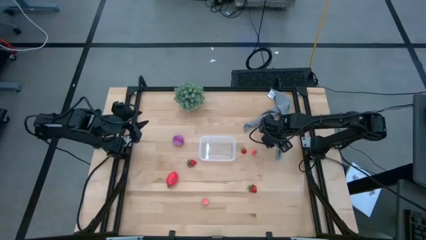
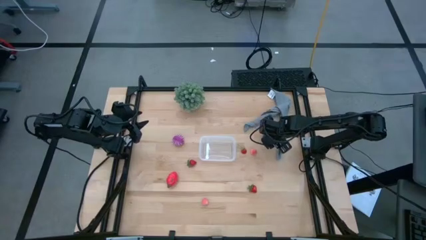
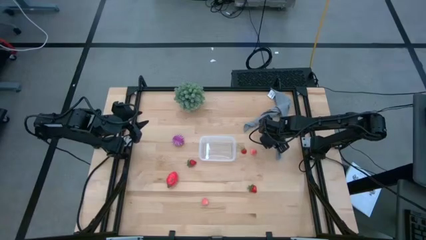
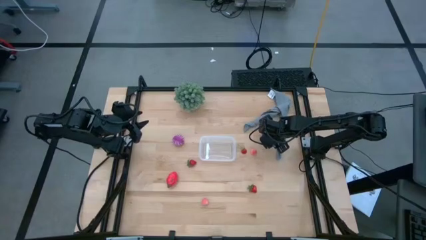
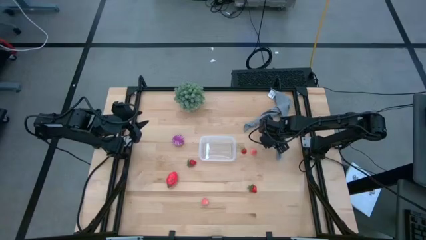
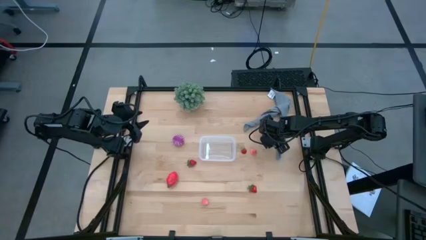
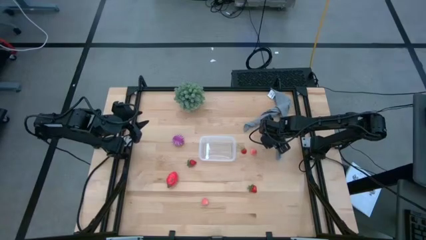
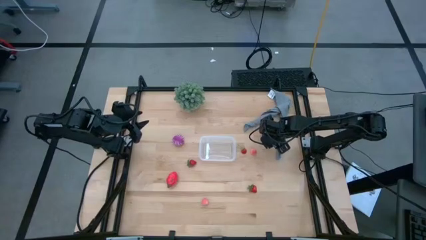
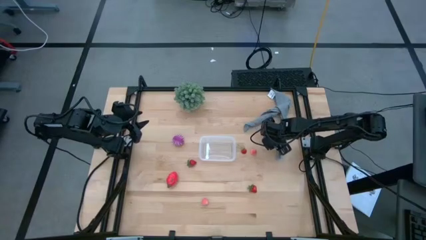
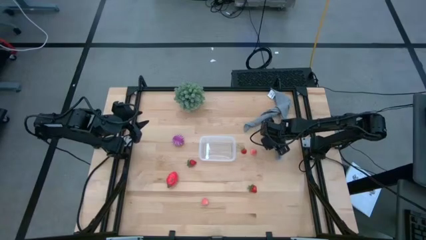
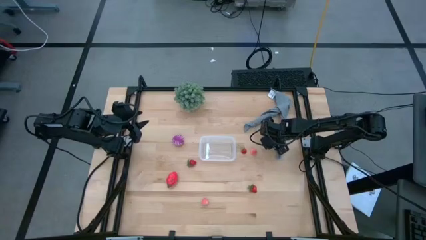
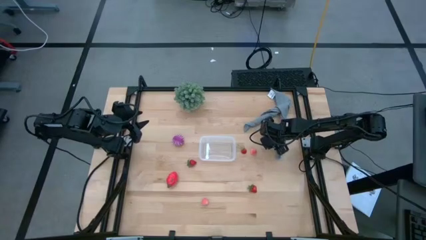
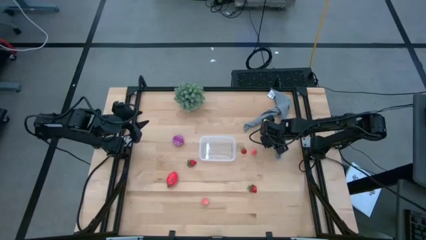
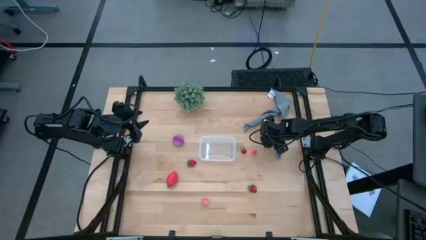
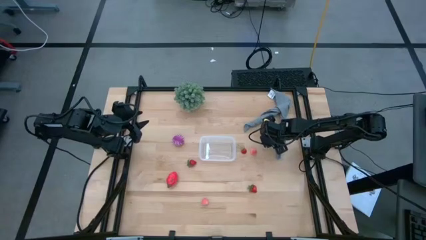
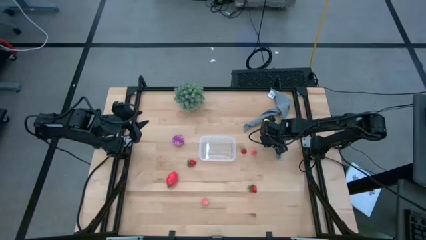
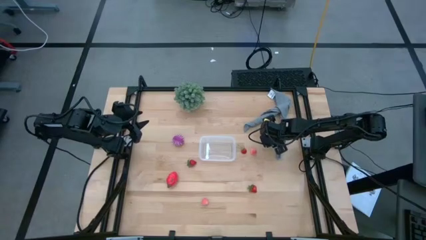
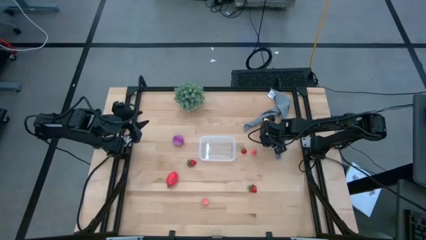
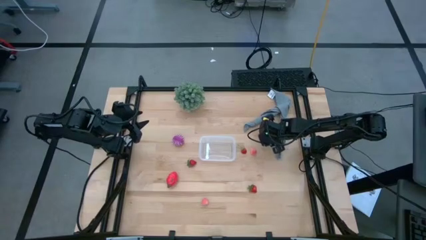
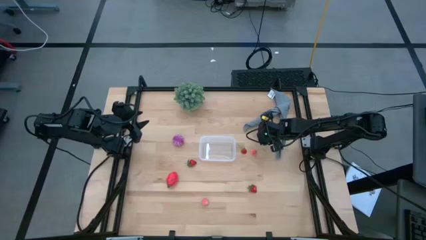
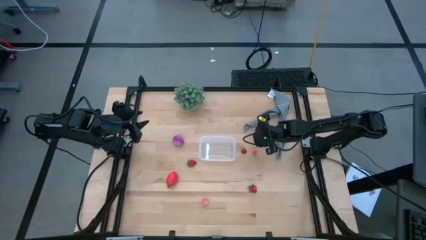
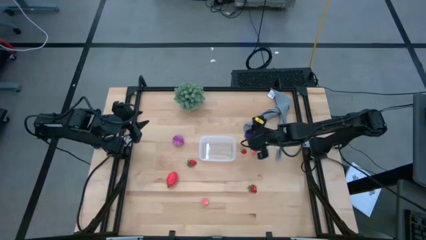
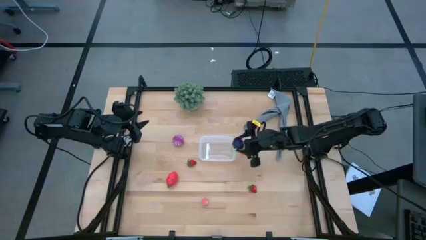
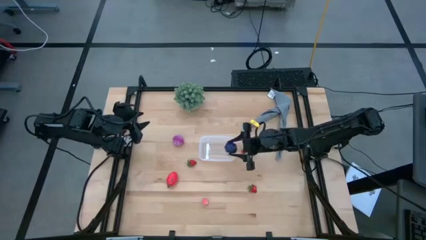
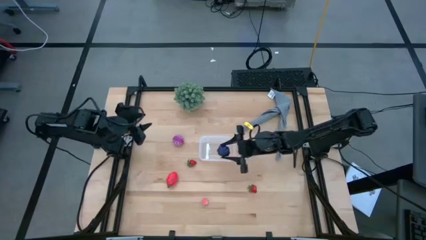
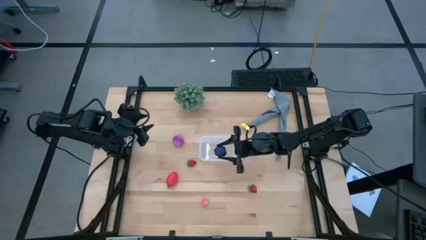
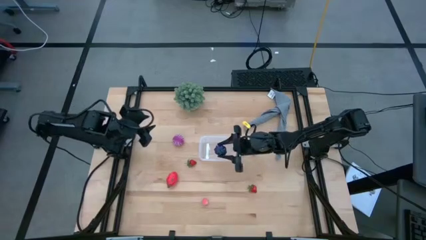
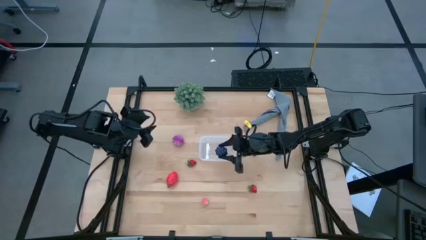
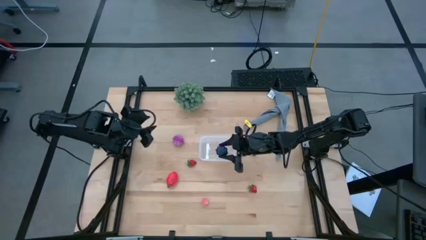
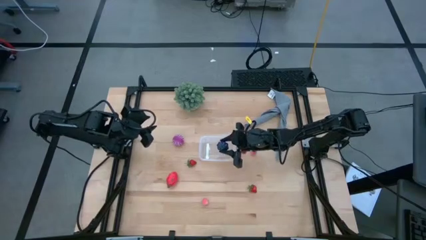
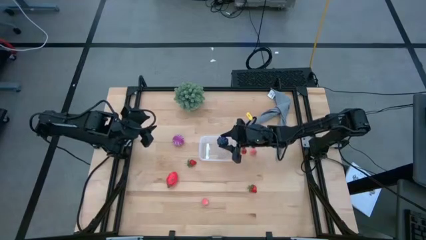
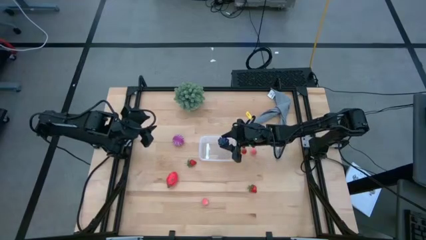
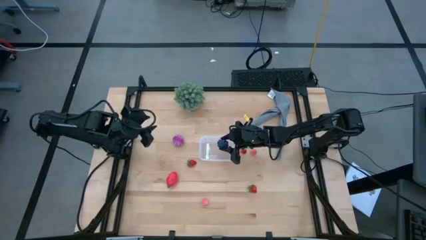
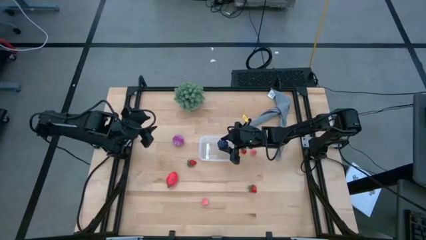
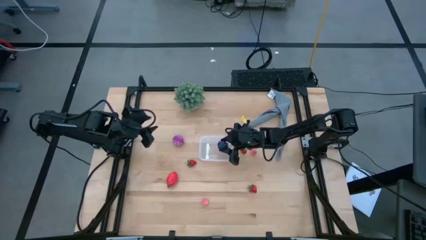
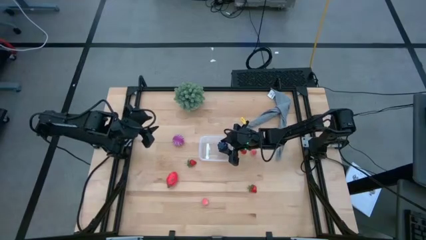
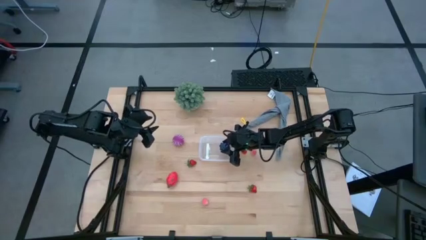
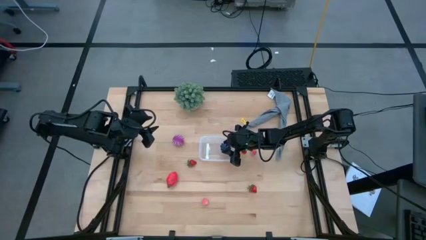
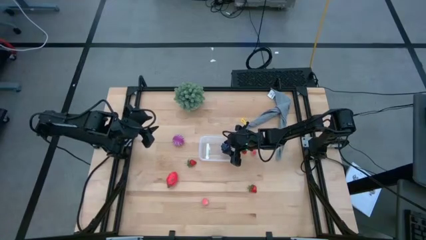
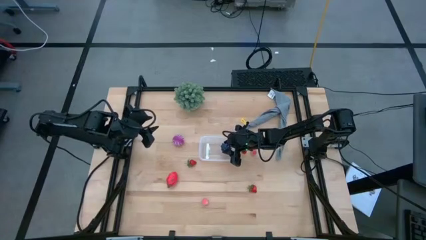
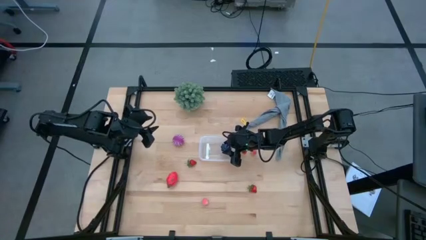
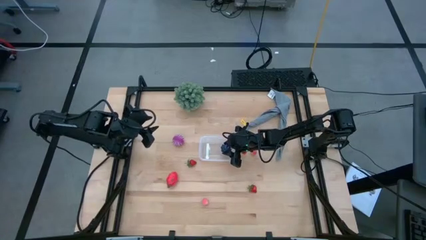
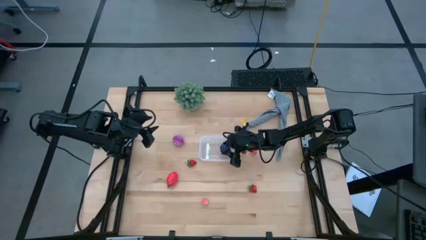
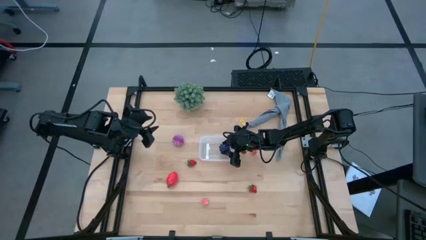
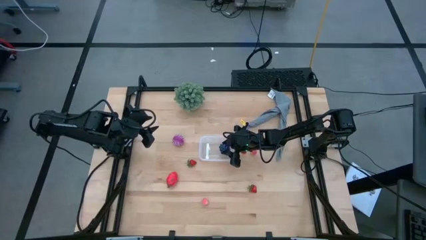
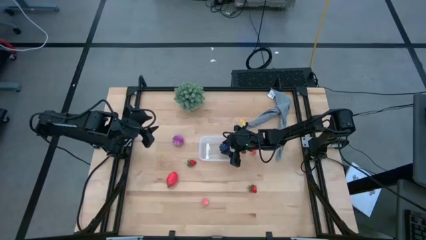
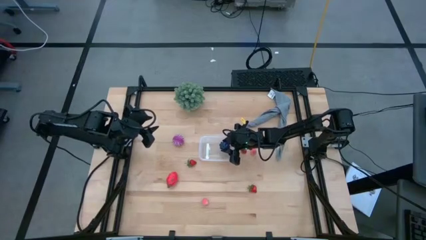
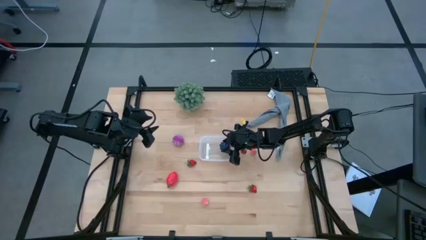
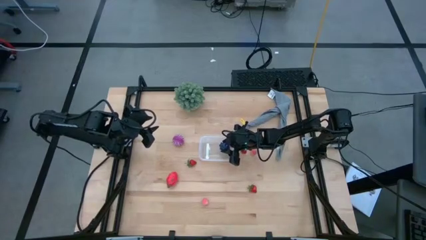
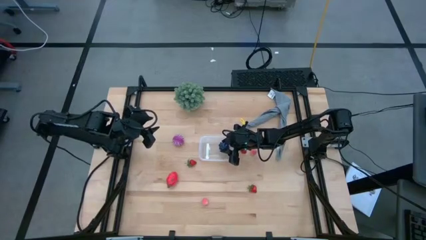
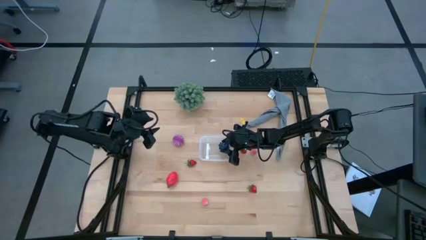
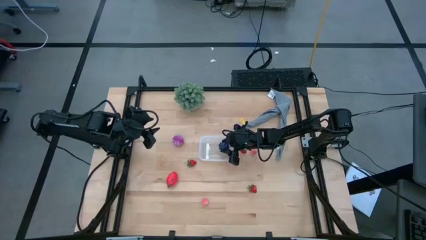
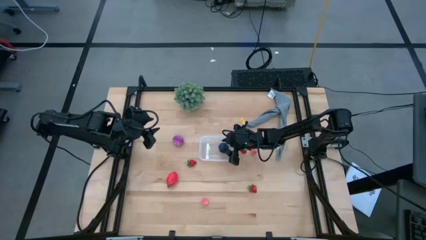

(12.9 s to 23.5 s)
Task: Pick and placing Produce into tupperware
Put the grapes into the transparent container

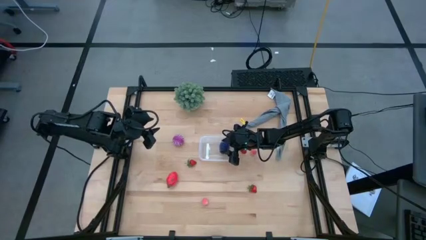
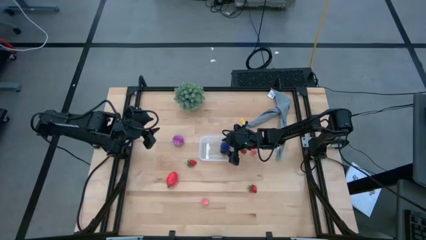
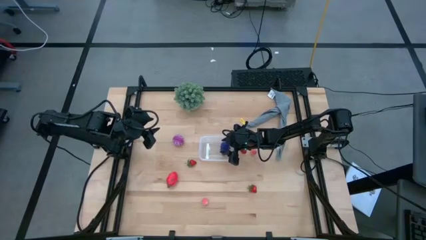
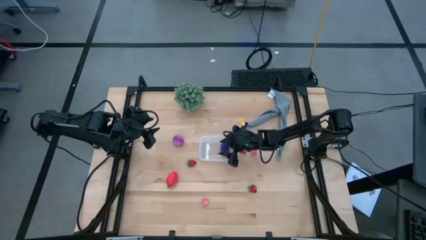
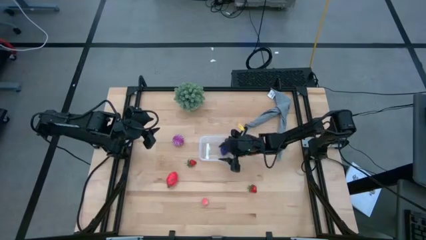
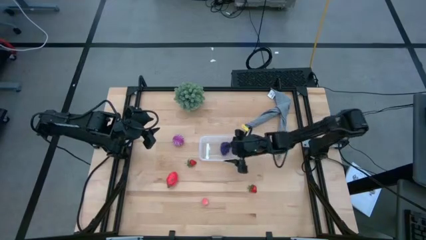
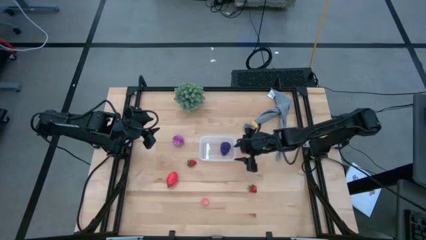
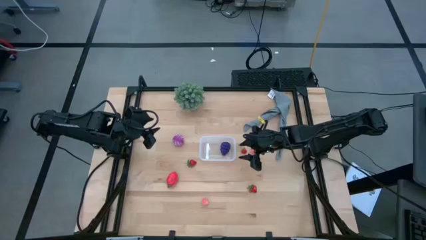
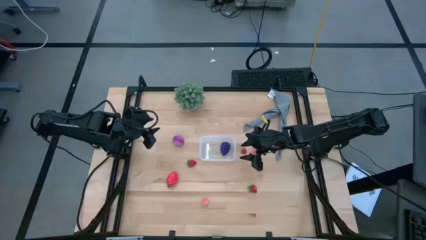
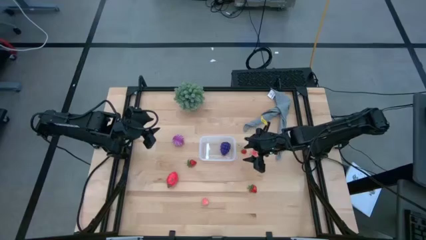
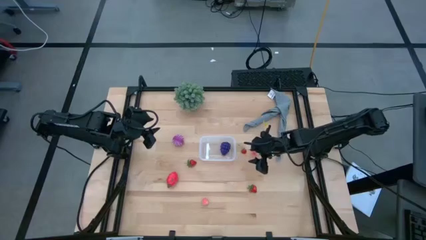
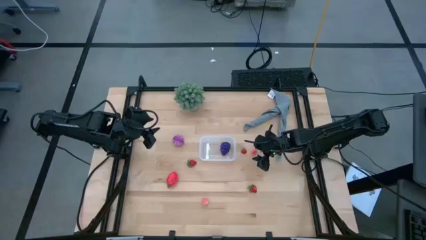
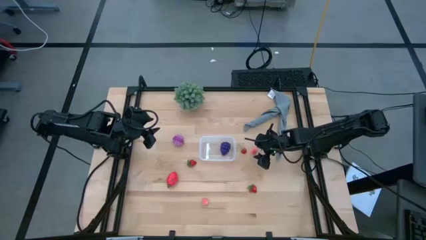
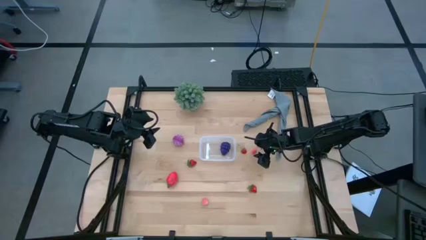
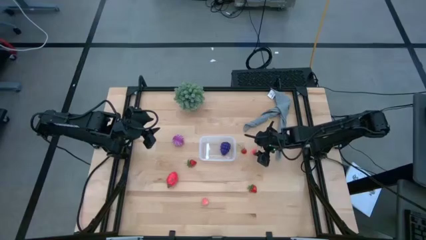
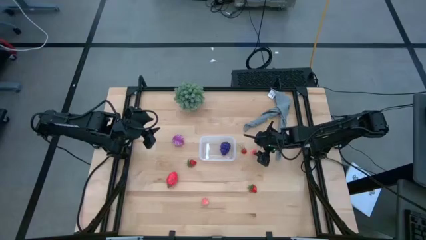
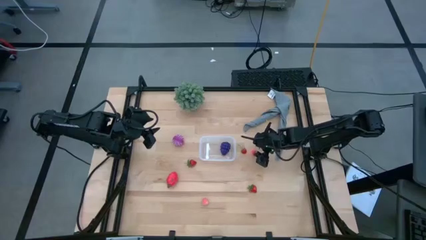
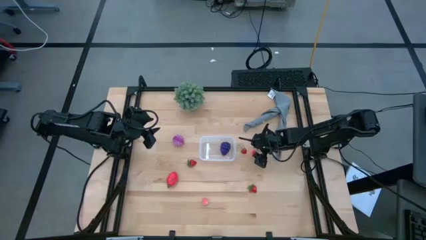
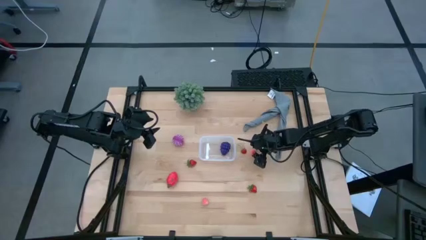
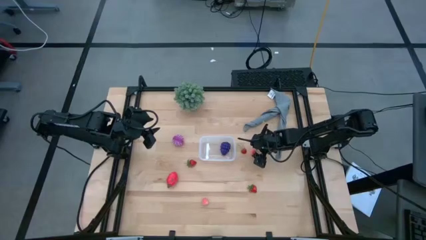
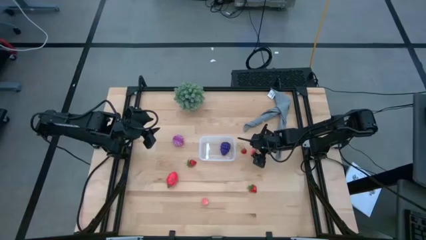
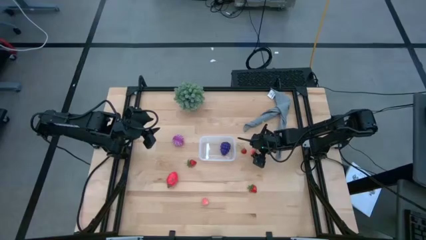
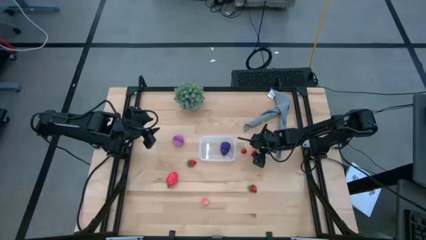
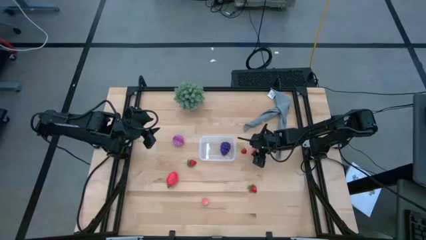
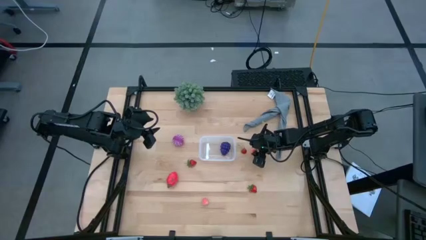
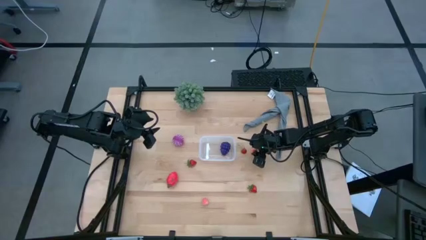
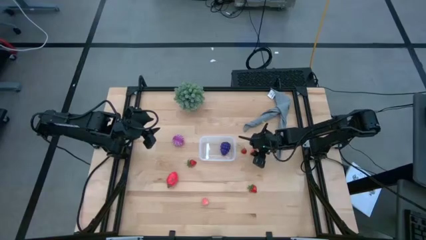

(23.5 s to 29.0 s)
Put the top peach into the transparent container

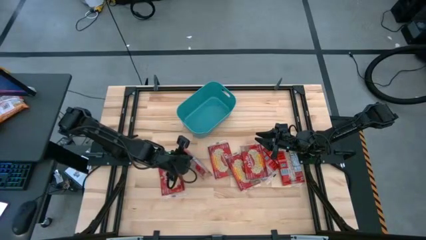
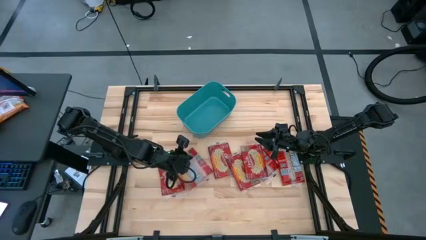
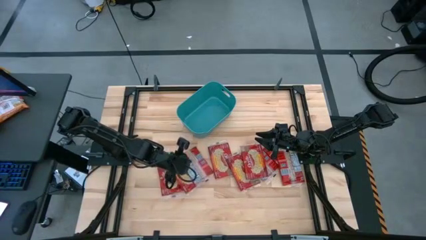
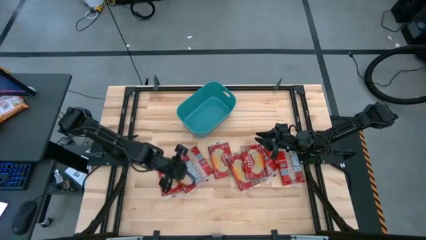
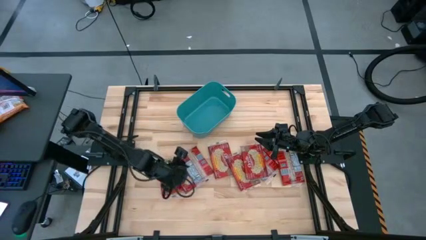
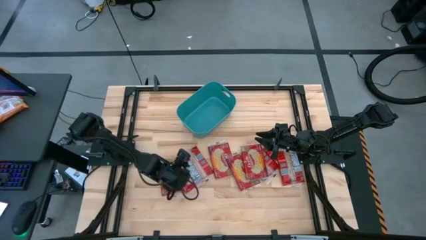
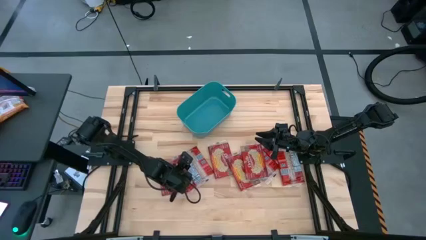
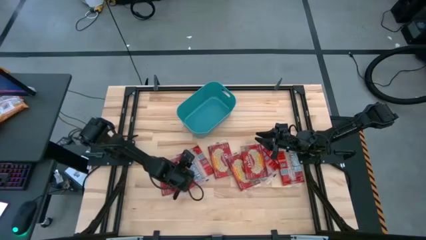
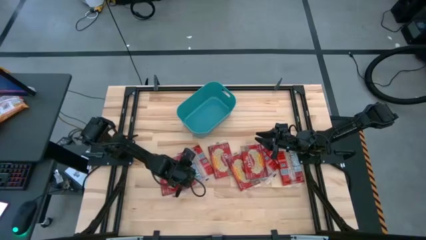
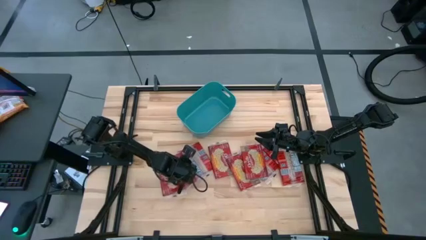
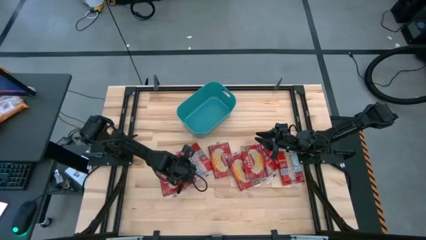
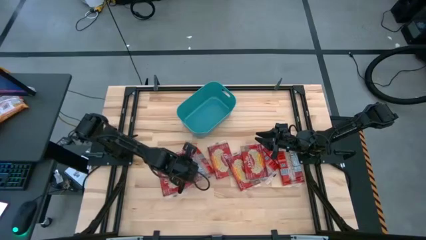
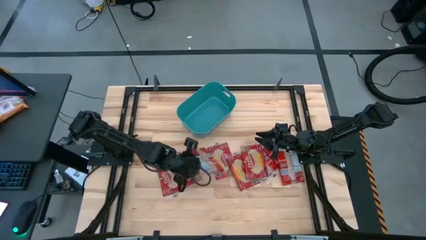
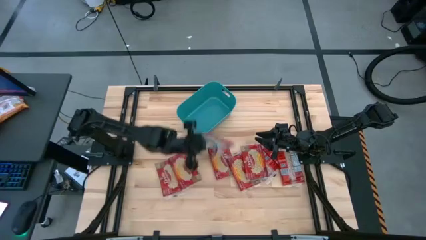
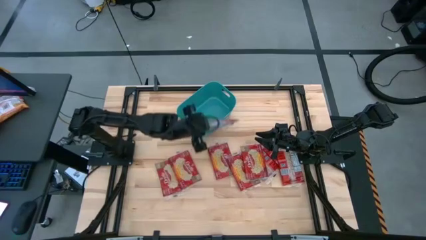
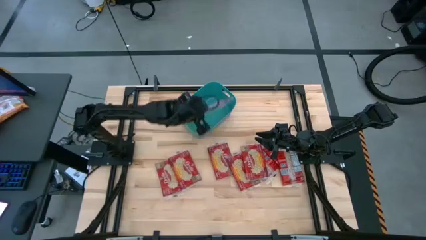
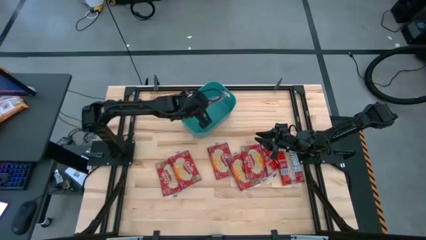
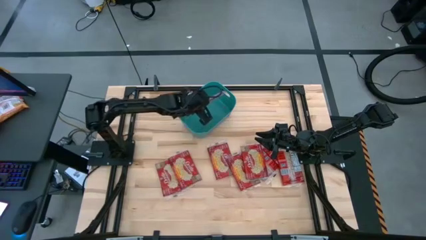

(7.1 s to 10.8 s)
Task: Sort popcorn bags into baskets
Put the red popcorn bag into the green container
